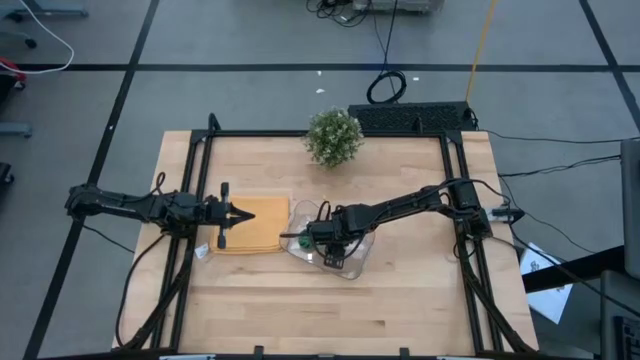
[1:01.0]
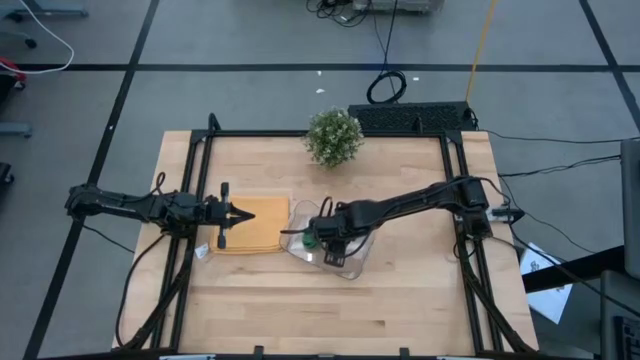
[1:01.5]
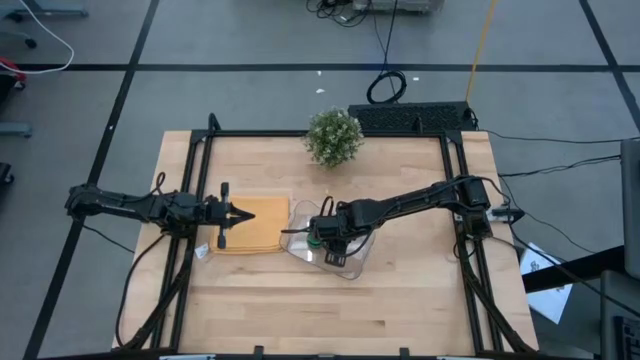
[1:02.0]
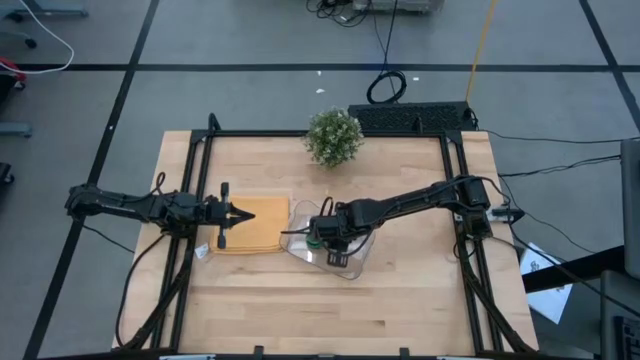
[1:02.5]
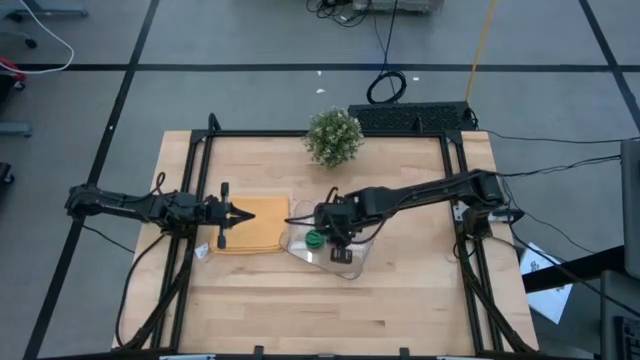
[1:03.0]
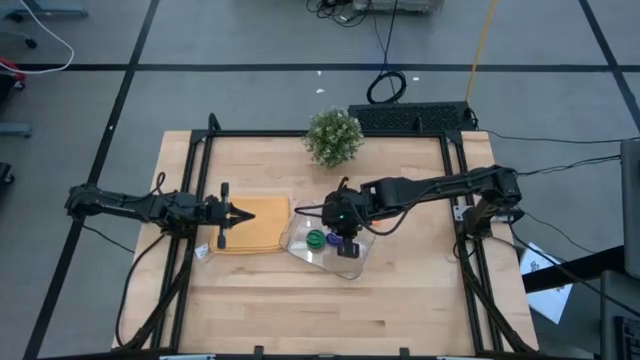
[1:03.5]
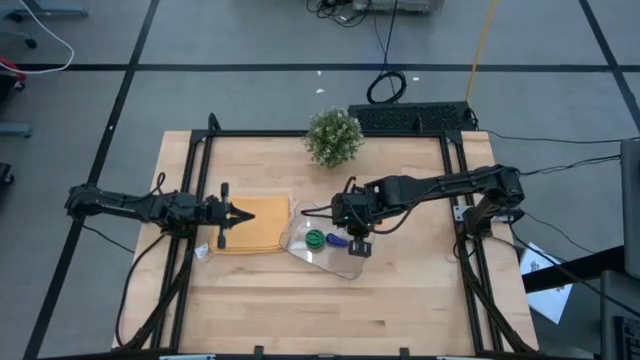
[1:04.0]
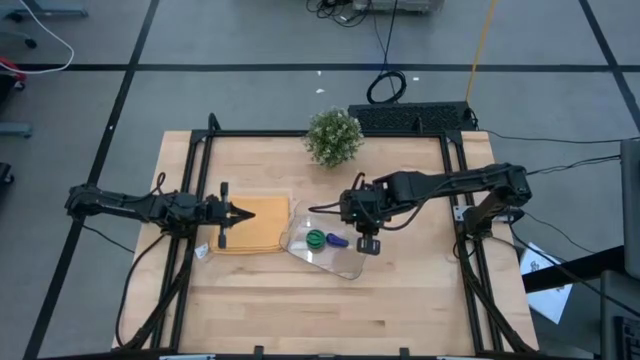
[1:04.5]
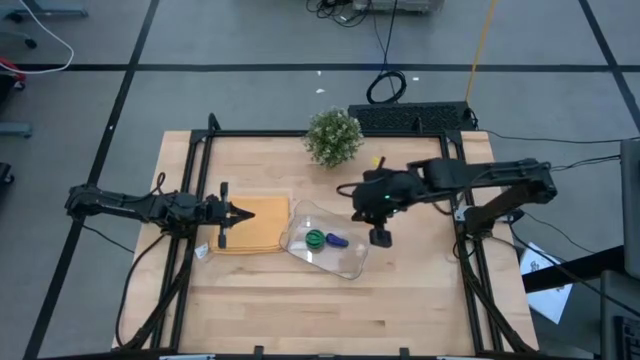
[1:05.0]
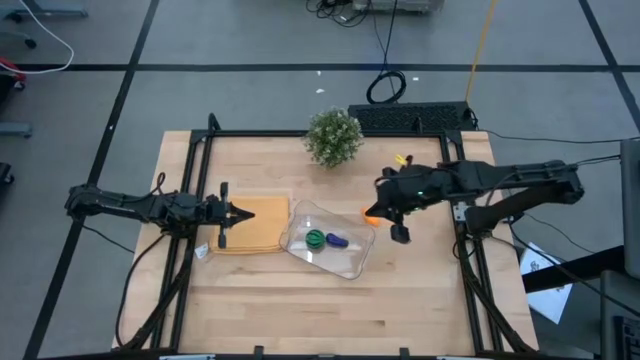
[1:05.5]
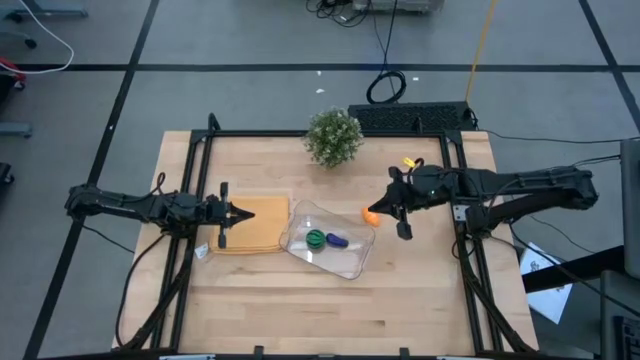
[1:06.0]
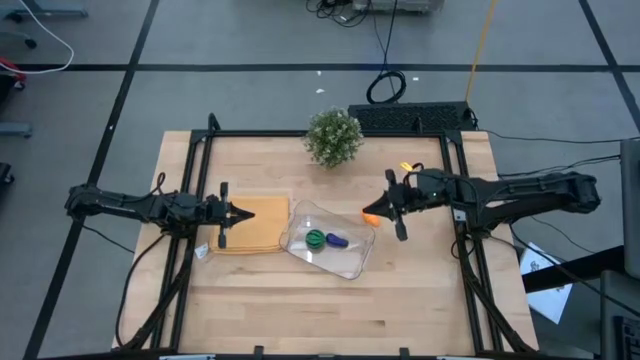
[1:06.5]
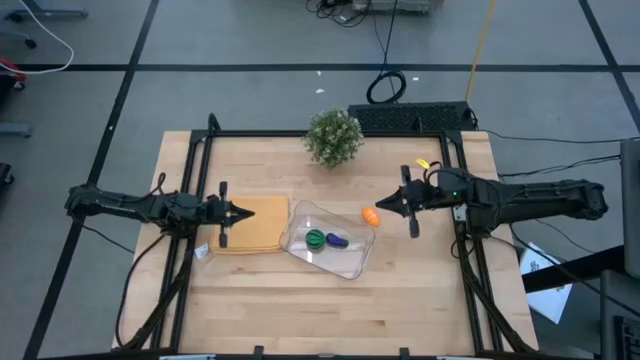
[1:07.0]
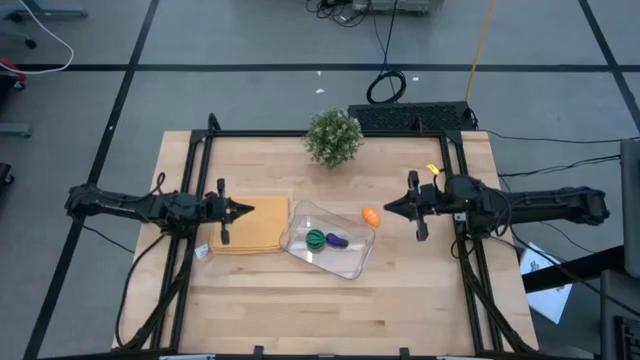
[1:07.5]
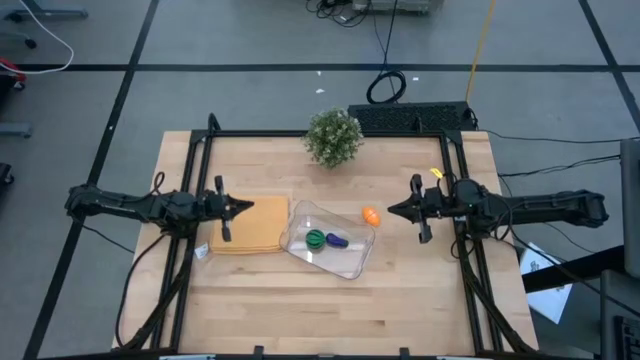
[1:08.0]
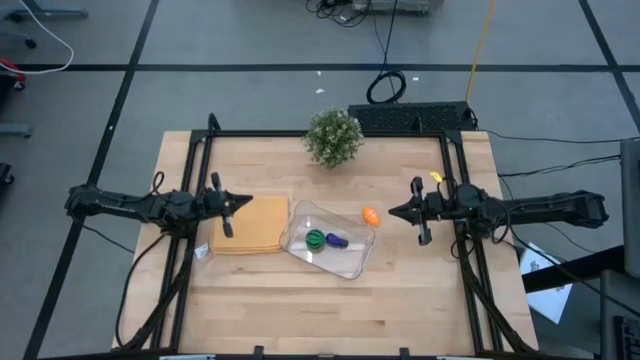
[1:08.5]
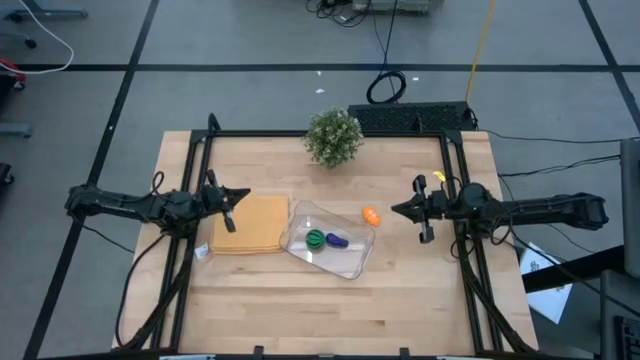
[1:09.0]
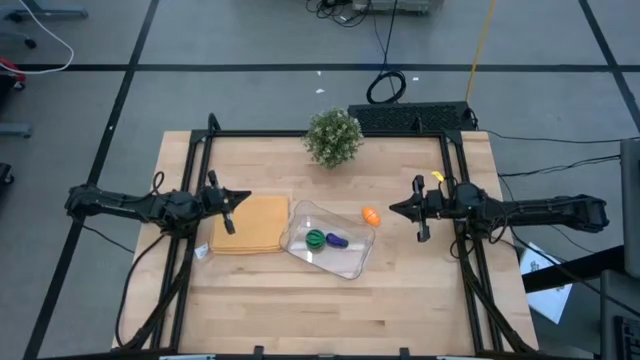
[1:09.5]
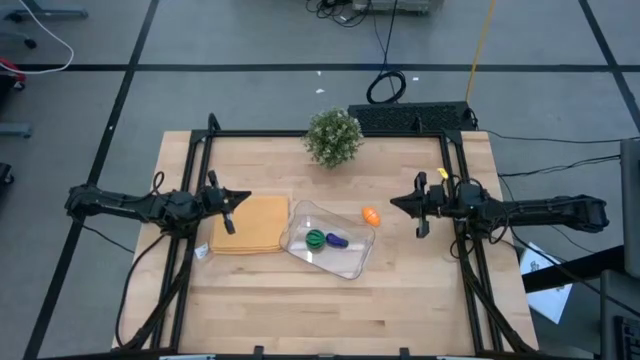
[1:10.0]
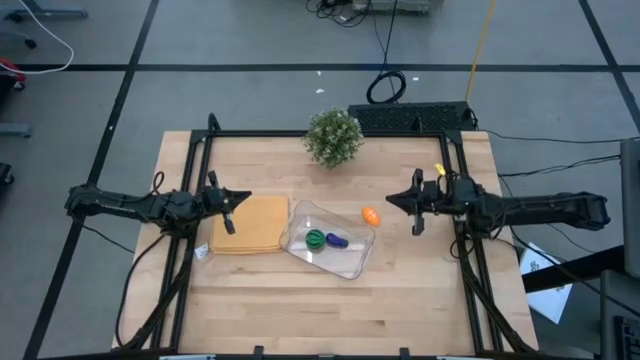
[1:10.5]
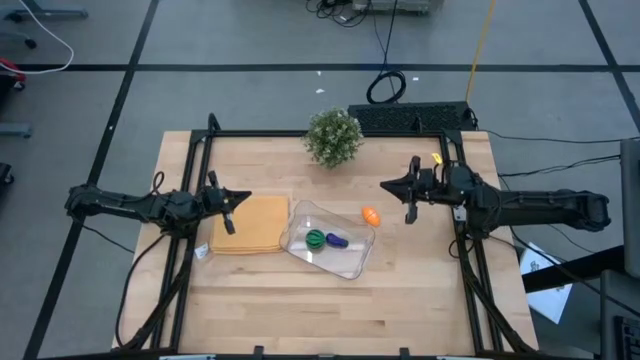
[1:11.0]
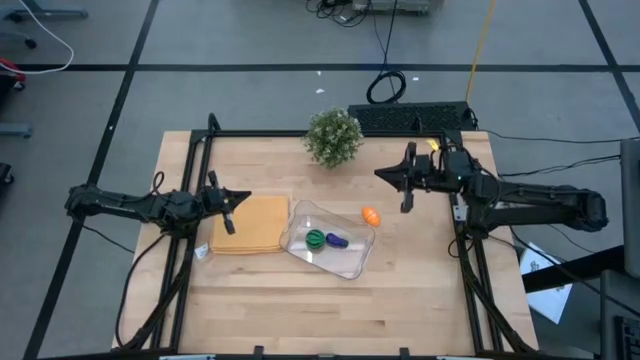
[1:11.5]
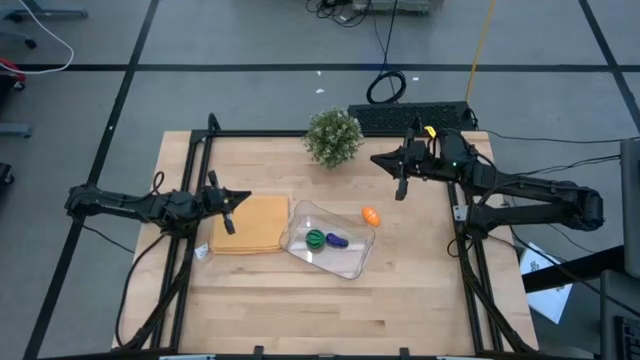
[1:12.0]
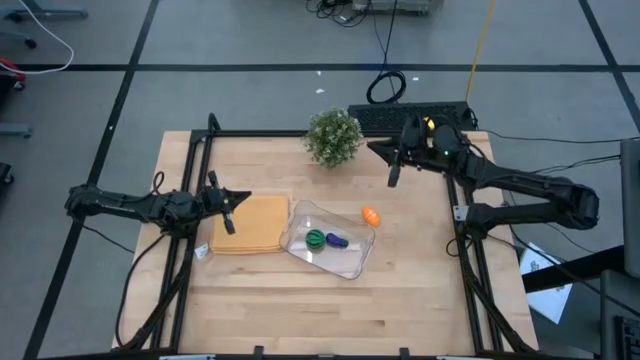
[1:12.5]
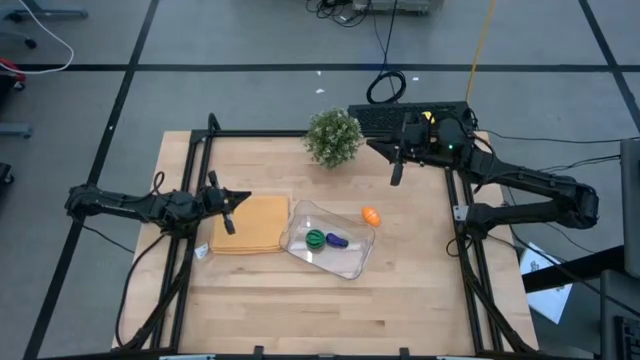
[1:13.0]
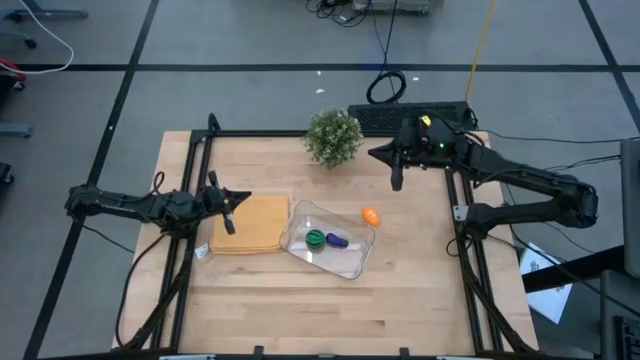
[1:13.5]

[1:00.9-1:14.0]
Task: Pick and placing Produce into tupperware
Put the bread into the transparent bin

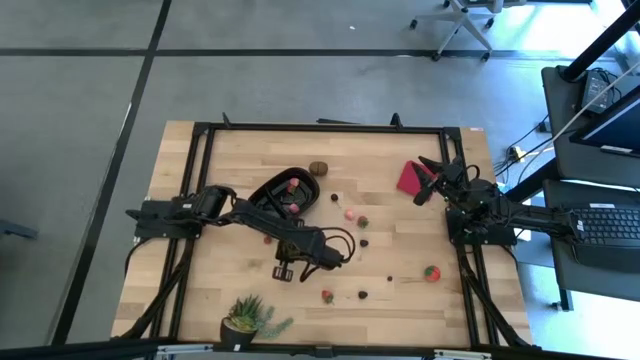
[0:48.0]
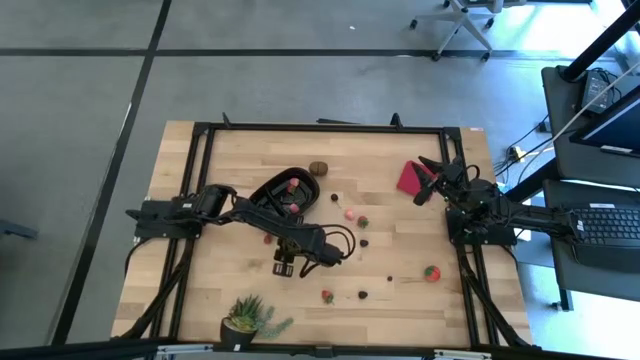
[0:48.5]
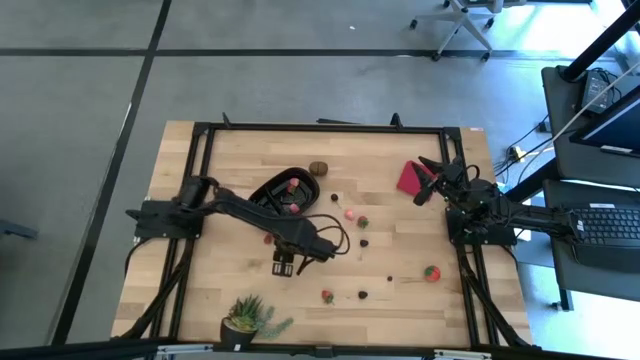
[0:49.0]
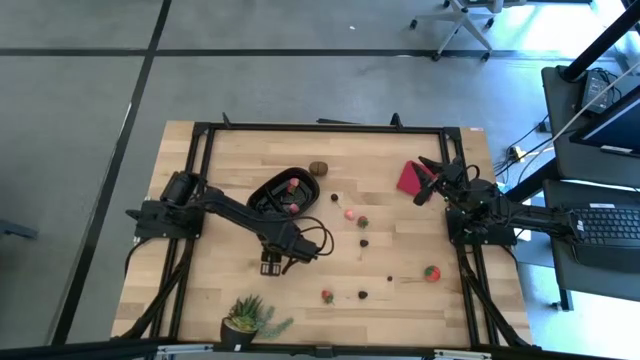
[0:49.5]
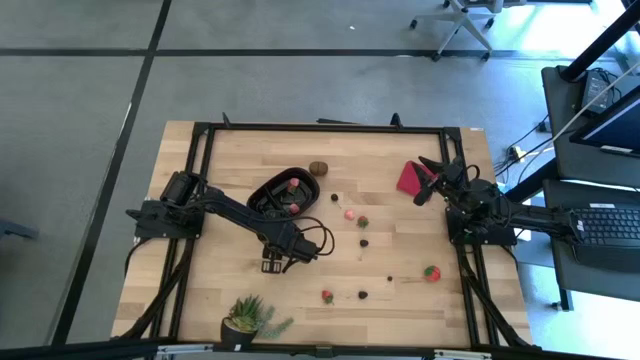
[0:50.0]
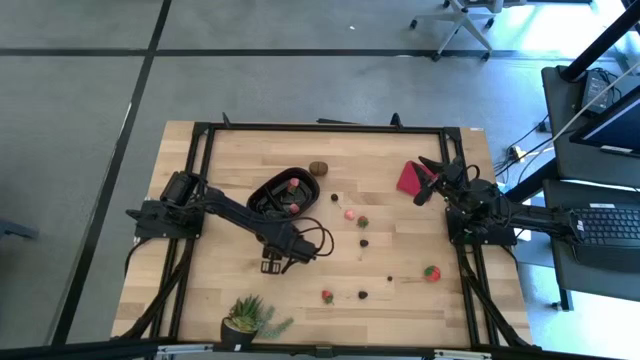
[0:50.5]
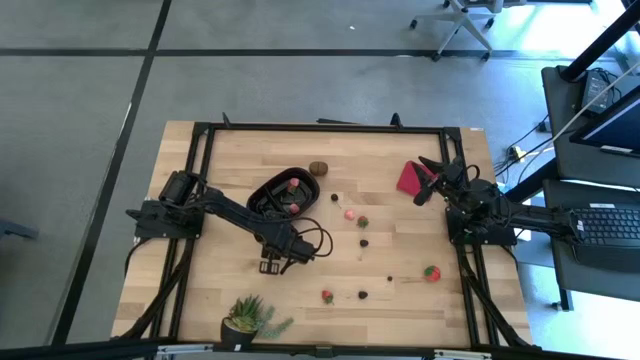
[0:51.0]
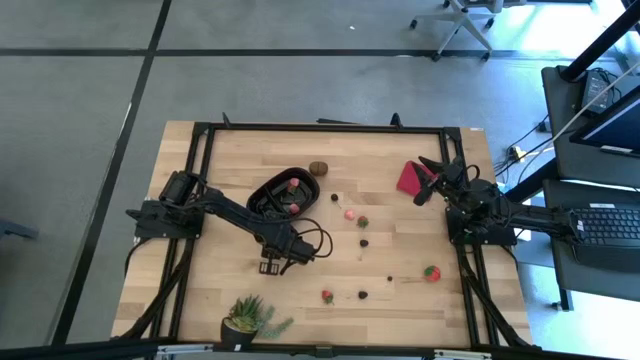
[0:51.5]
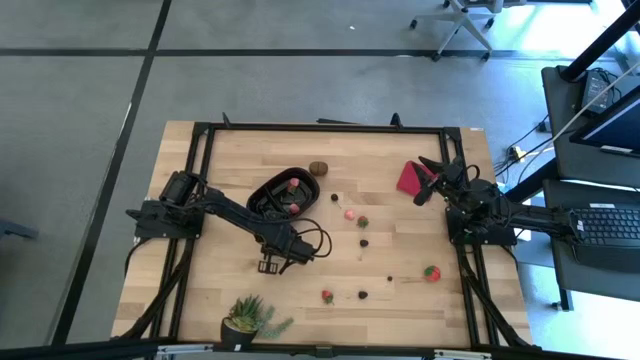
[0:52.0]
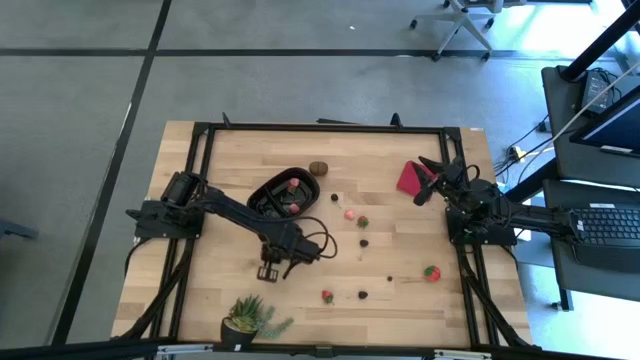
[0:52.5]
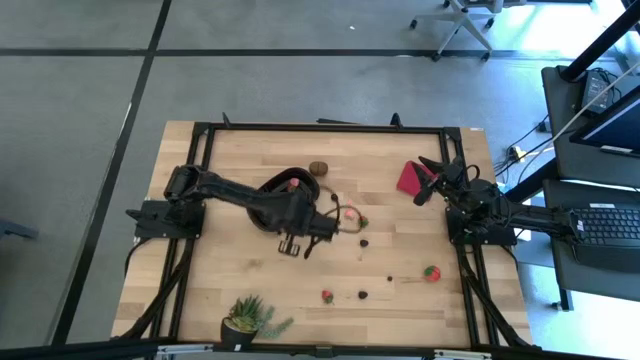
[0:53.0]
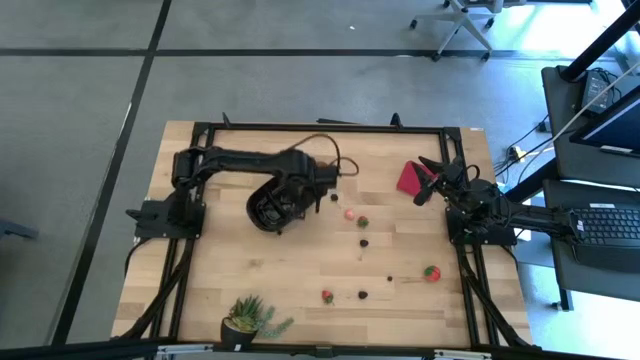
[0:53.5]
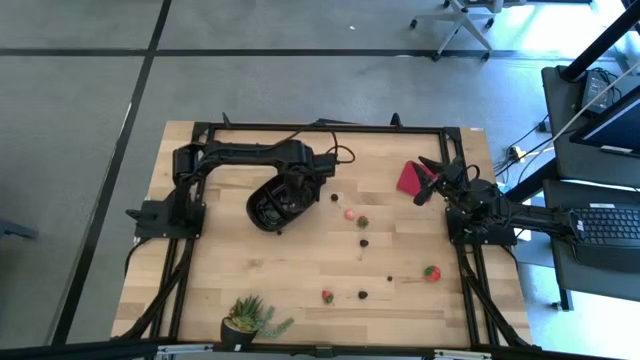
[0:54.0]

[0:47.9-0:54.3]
Task: Pick and placing Produce into tupperware
Put the red strawberry into the black bin

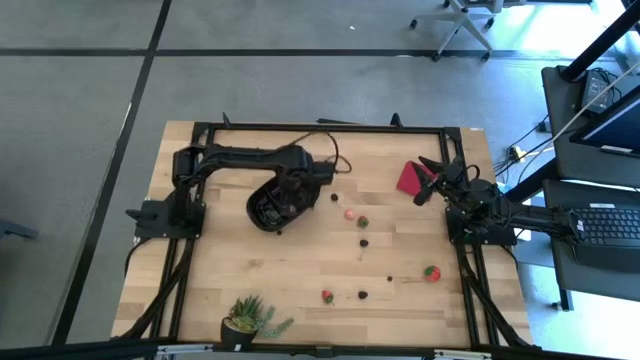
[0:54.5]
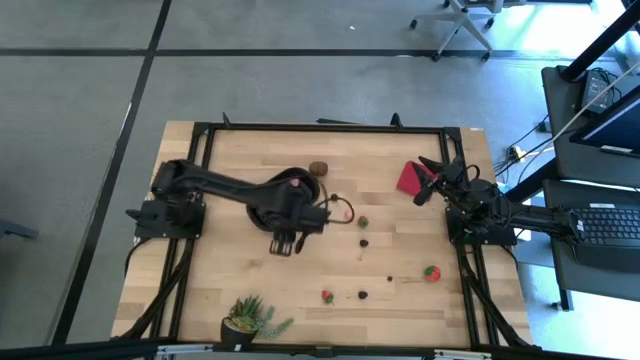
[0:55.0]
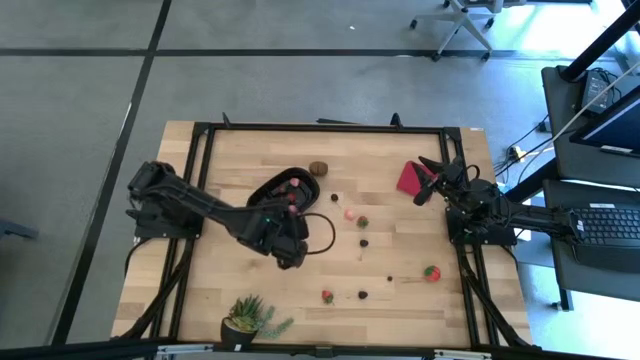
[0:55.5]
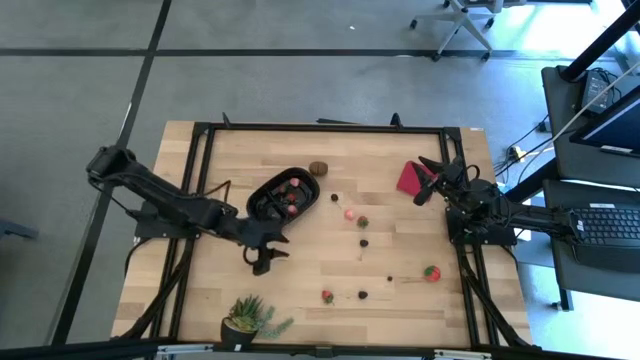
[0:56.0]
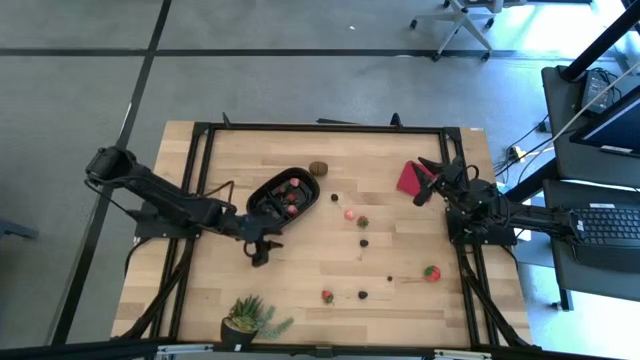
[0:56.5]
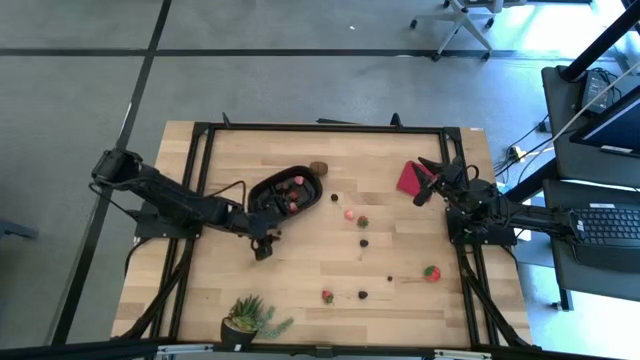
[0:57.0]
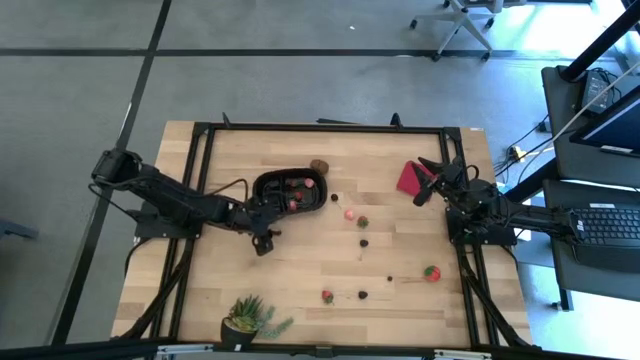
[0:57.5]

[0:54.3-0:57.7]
Adjust the black bin

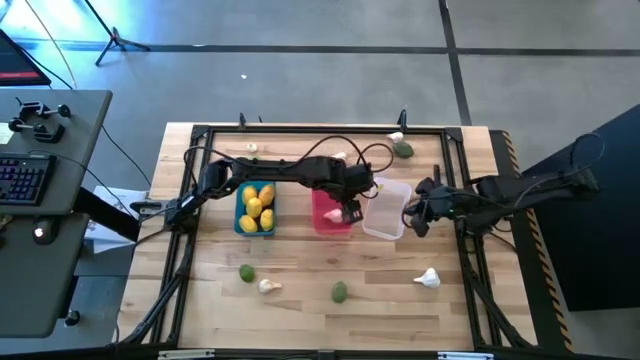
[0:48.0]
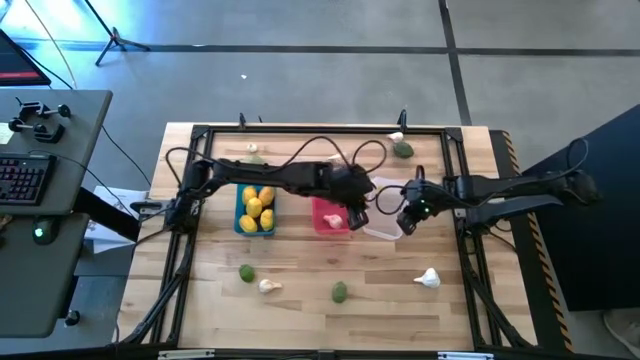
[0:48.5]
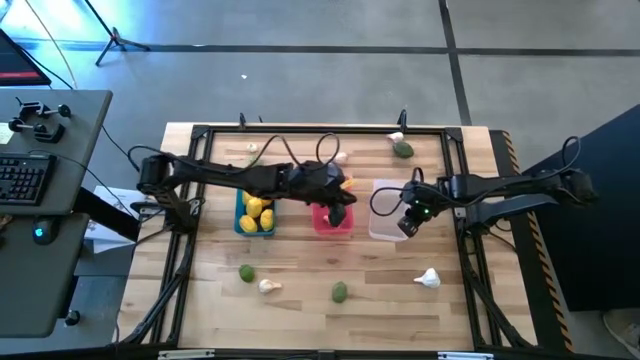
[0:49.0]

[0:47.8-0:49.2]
Task: Sort produce into baskets
Adjust the white bin
